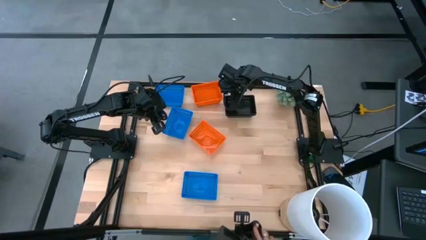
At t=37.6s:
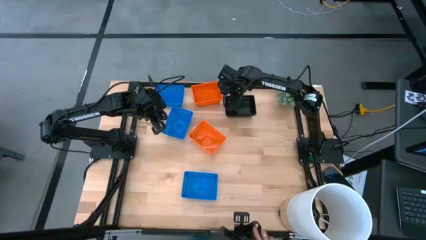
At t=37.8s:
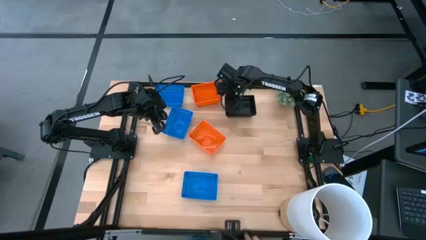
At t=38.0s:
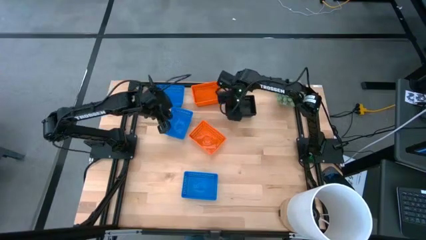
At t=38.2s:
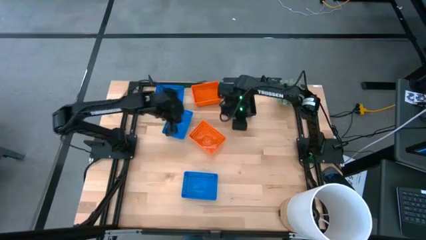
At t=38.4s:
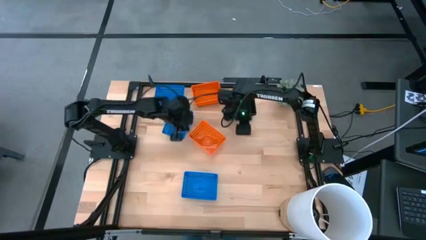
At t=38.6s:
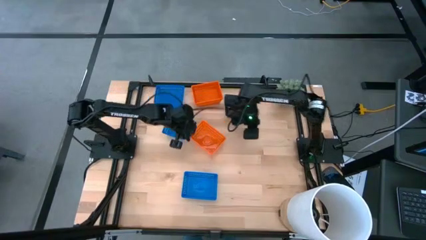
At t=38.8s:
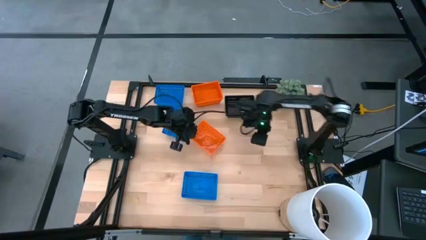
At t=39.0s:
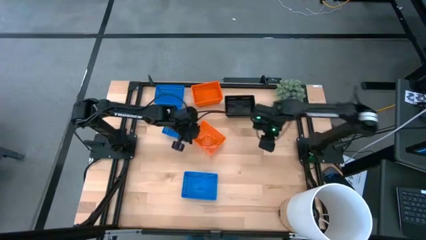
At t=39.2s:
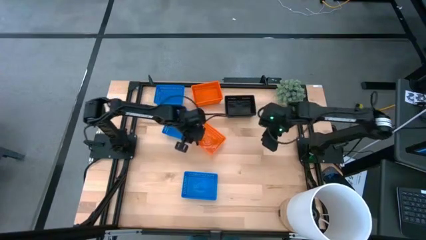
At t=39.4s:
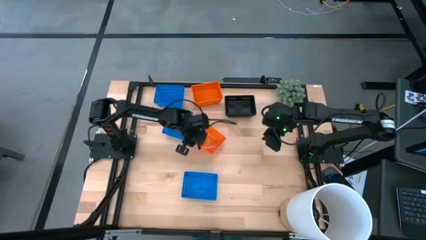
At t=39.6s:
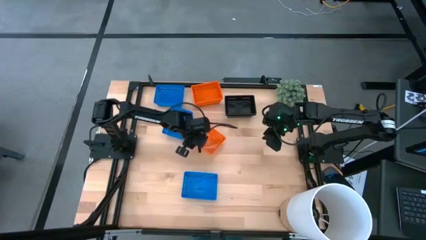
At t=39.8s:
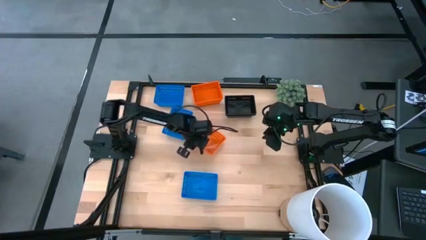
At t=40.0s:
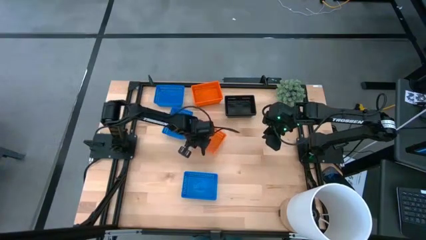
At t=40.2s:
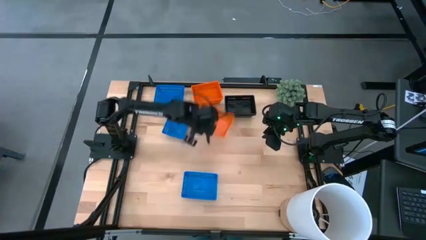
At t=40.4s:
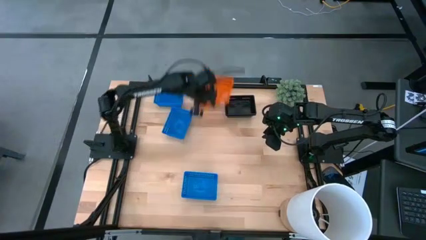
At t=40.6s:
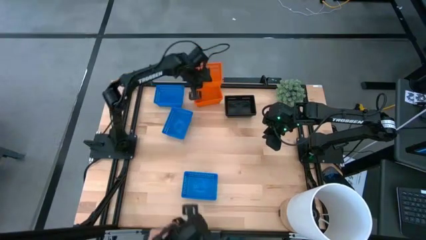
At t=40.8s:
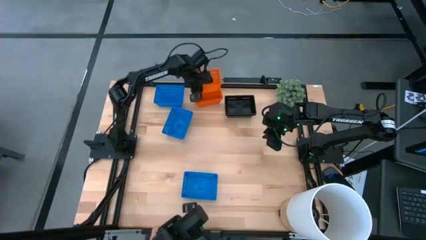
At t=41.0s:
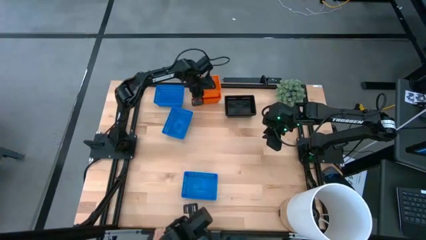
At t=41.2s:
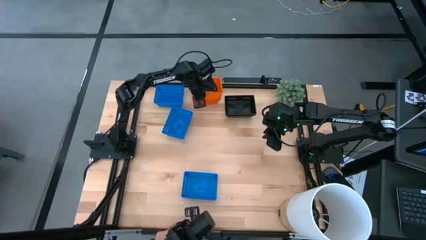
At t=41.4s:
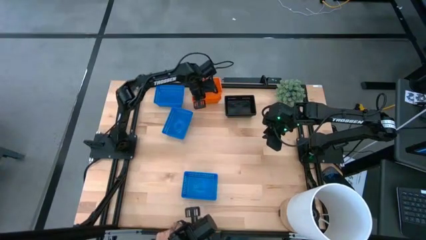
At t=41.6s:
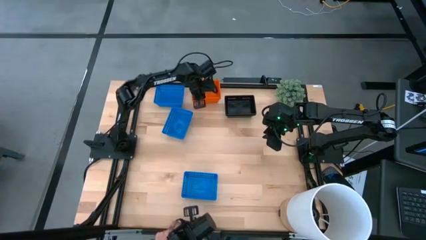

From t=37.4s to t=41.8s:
Stack the bottom orange bin on the orange bin

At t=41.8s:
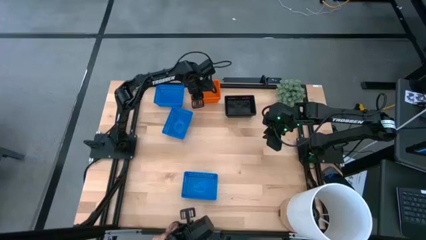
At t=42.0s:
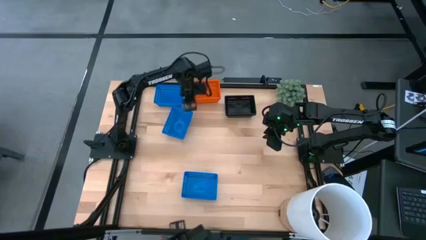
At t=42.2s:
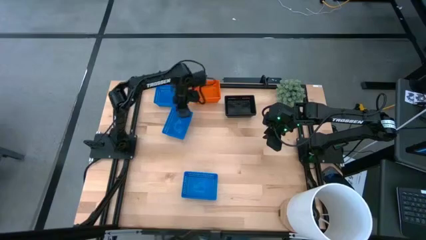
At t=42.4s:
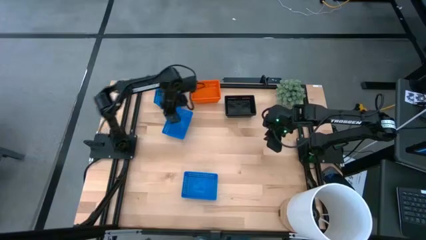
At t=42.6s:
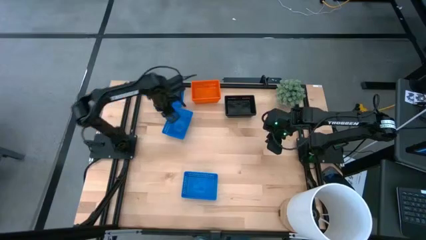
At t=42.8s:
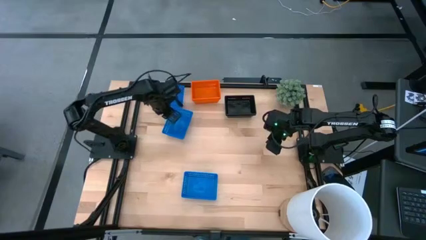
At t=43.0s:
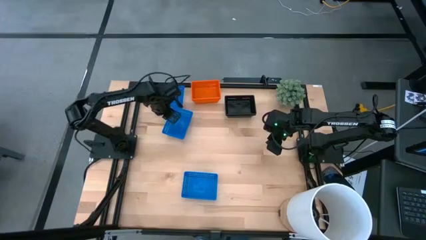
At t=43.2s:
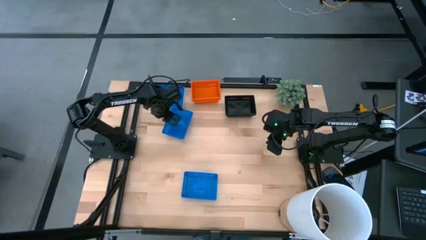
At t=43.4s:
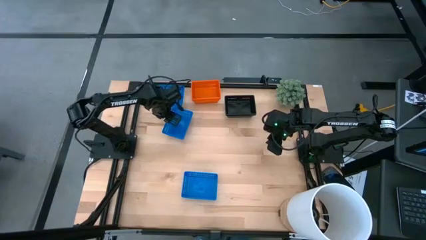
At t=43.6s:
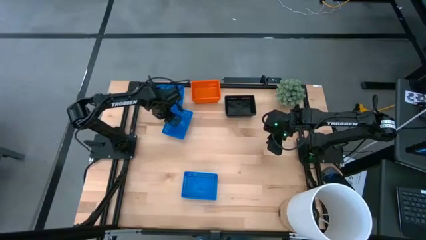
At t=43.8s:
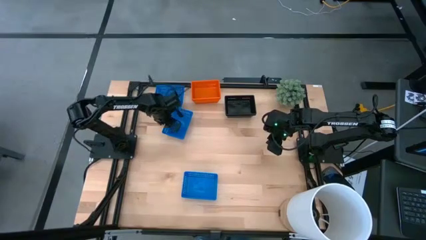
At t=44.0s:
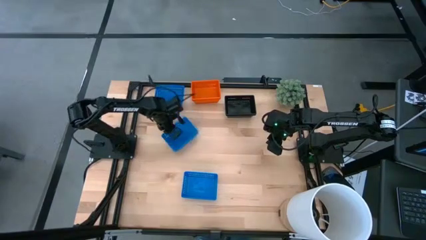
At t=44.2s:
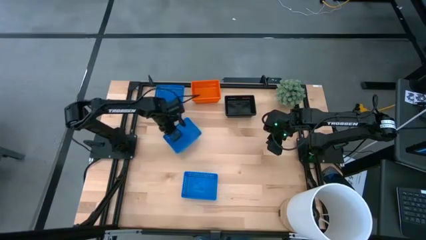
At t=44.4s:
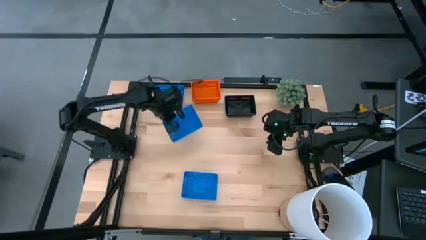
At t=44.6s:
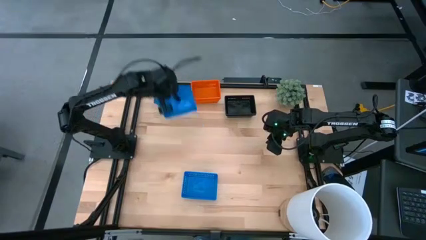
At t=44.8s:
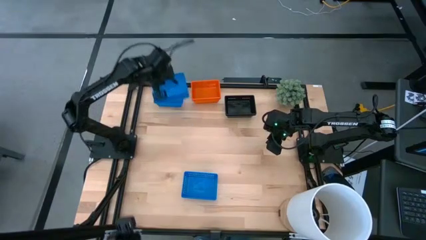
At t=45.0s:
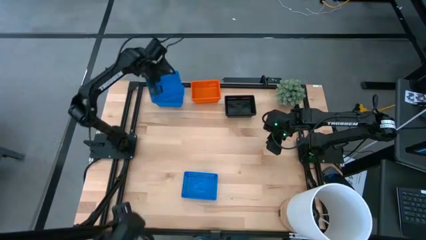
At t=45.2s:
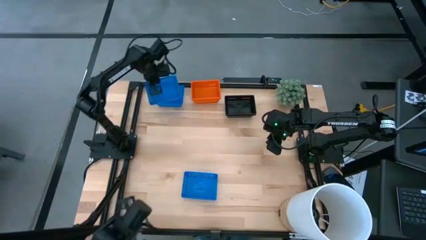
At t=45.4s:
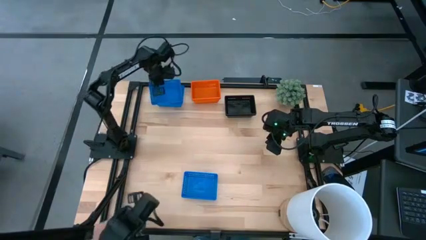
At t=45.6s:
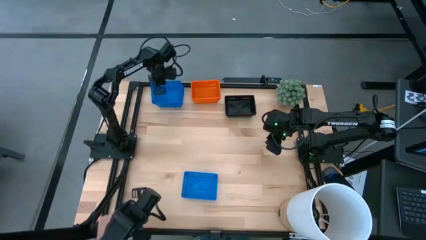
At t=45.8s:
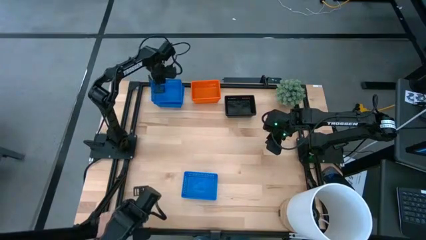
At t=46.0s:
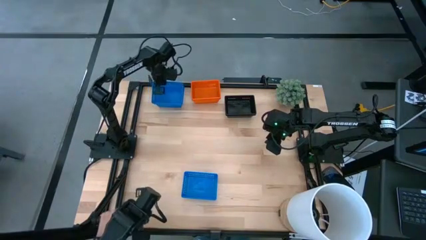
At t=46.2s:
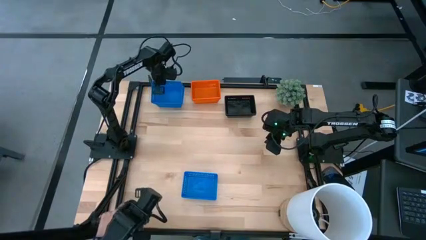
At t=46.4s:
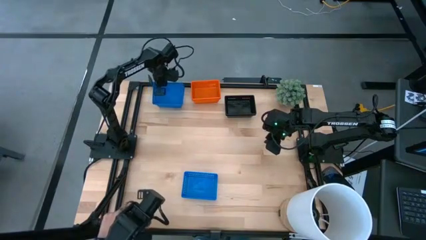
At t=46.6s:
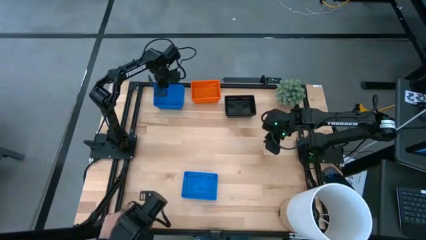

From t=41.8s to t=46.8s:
Stack the middle left blue bin on the top blue bin

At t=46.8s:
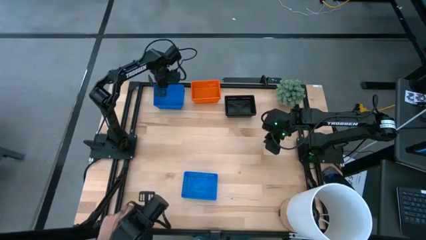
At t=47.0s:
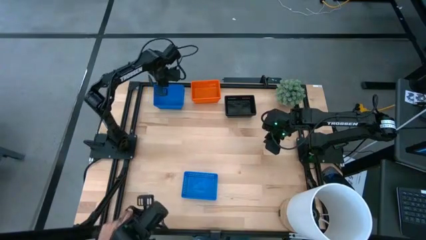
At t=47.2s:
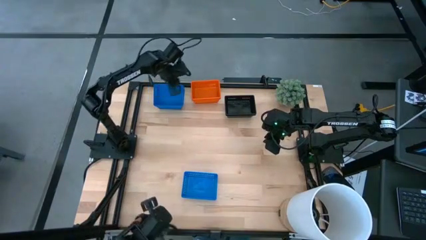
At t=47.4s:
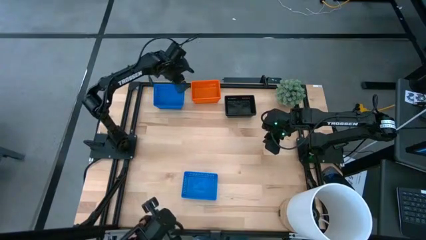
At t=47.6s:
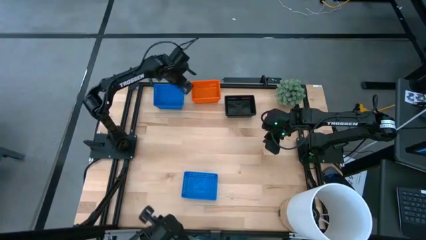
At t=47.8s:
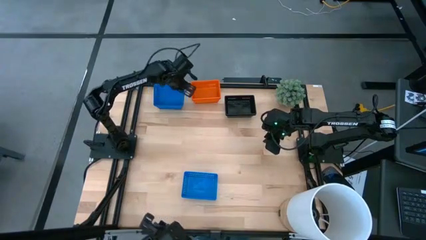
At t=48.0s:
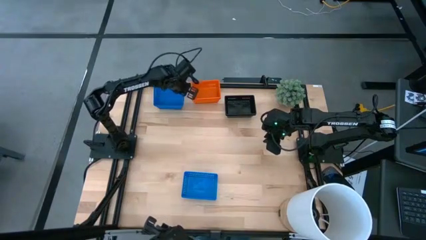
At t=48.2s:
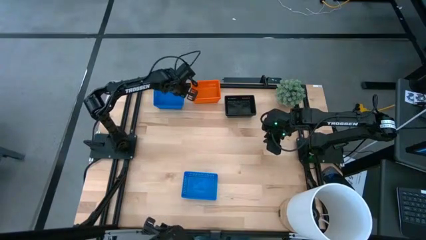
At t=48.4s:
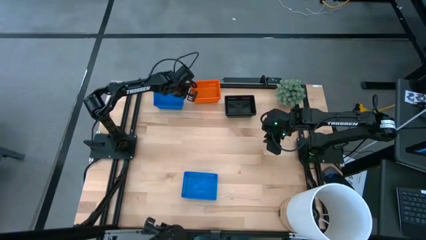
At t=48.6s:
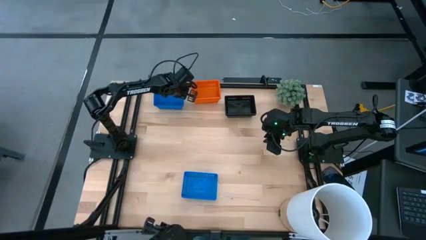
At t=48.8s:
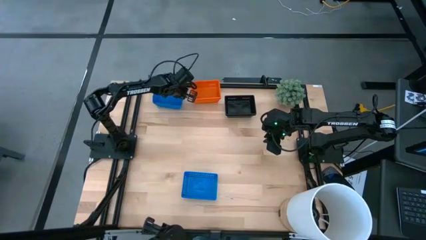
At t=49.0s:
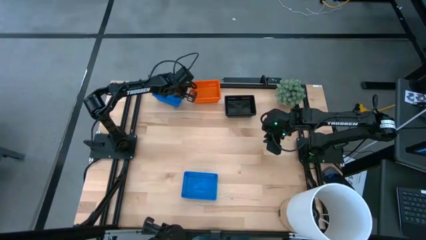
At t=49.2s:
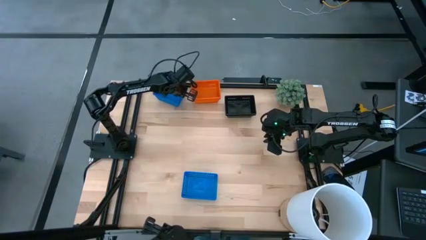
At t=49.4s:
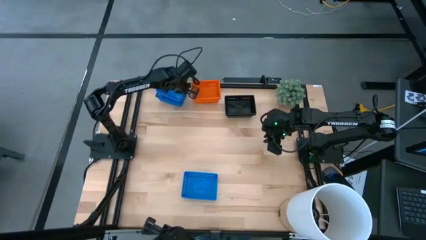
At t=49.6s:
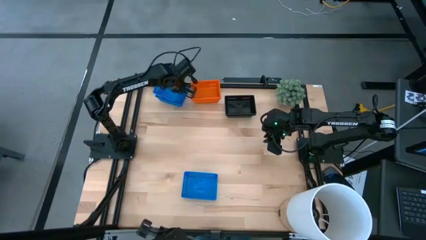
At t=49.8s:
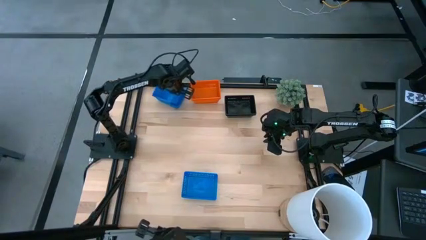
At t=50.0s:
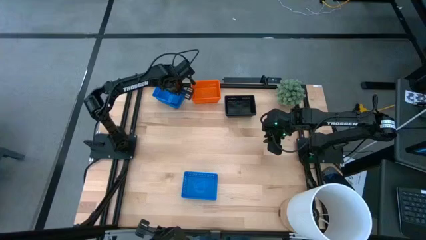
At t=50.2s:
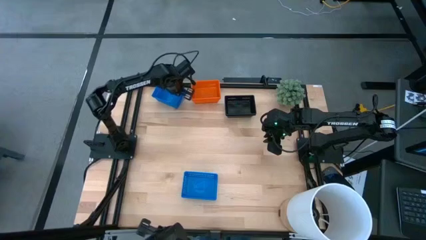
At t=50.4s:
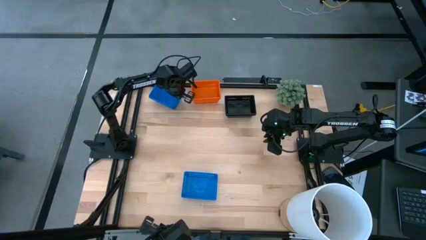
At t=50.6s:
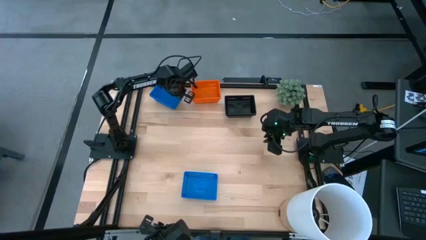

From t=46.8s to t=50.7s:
Adjust the stack of blue bins

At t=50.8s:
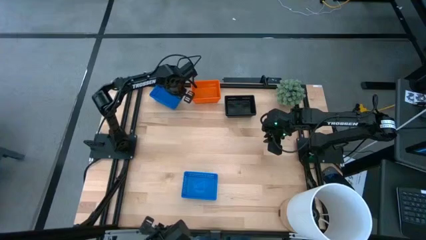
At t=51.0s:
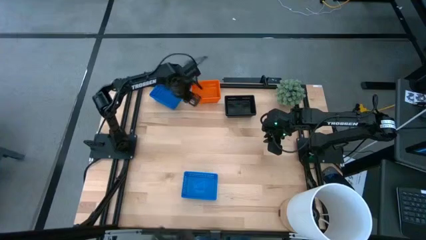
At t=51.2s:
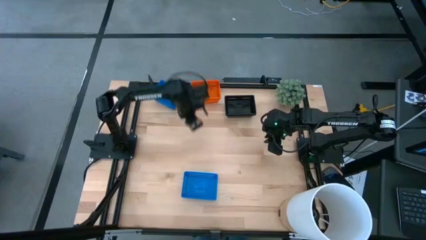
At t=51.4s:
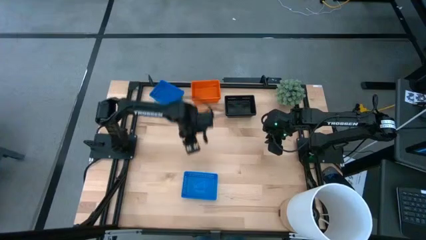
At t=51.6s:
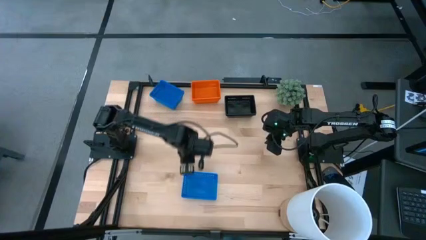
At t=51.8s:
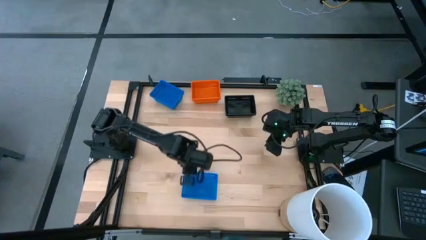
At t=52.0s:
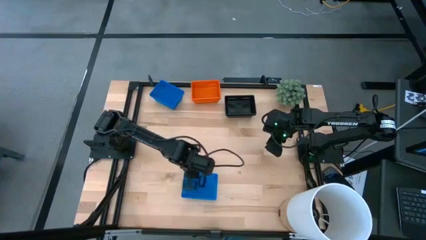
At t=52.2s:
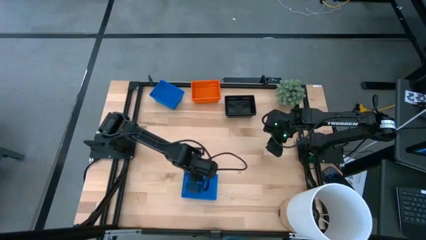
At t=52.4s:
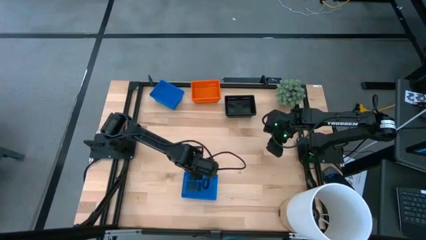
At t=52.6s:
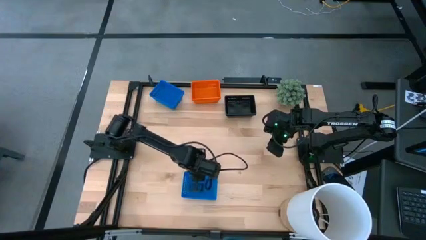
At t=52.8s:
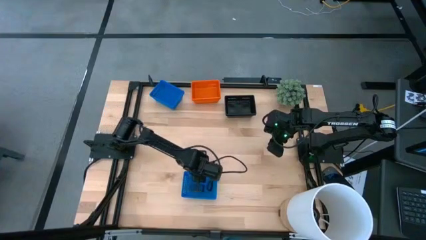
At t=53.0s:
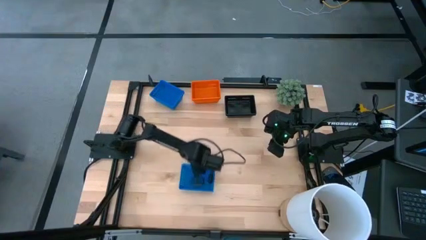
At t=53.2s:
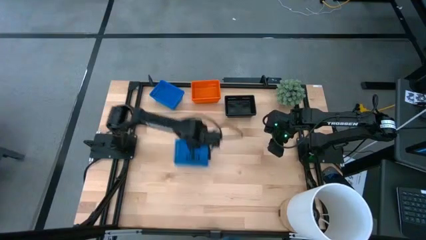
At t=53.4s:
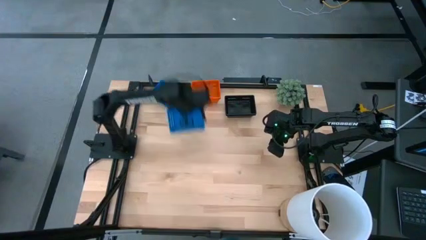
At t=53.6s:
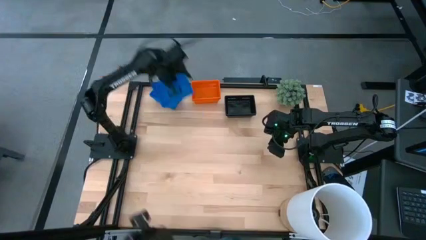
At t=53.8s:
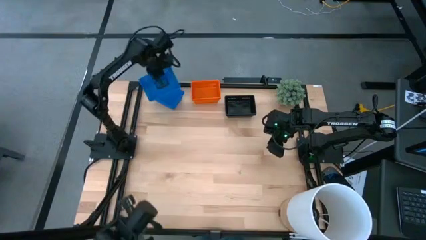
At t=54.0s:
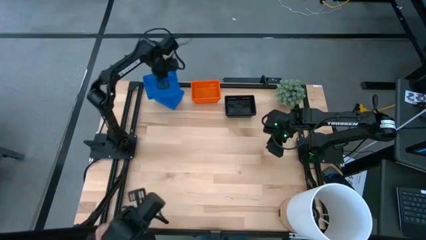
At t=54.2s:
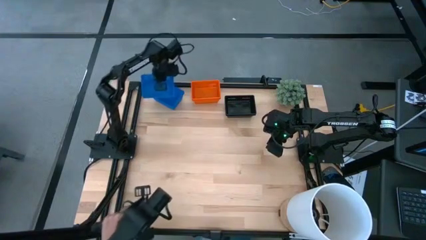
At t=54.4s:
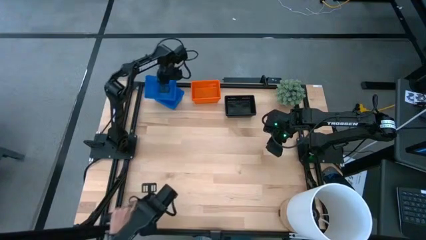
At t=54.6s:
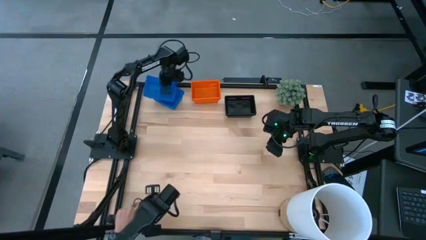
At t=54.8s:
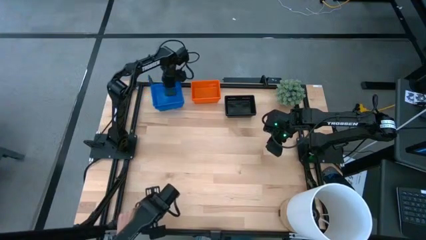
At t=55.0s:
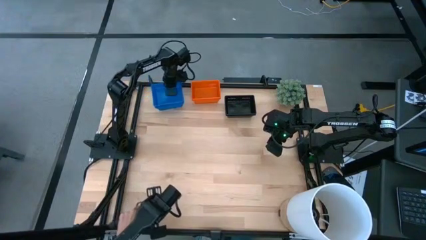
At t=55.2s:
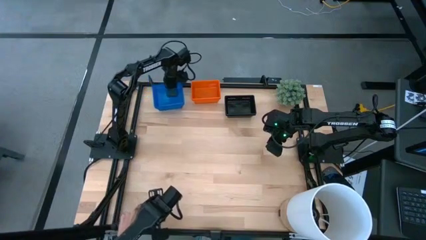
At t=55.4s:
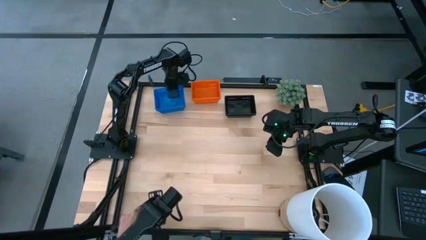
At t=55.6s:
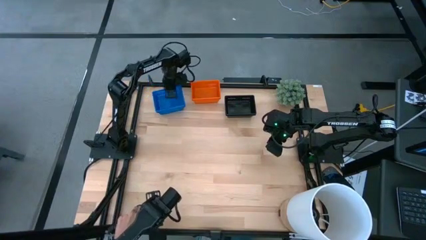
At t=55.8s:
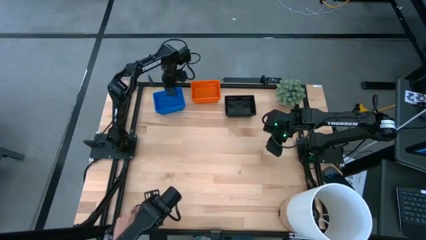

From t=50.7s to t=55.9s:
Stack the bottom blue bin on the blue bin
